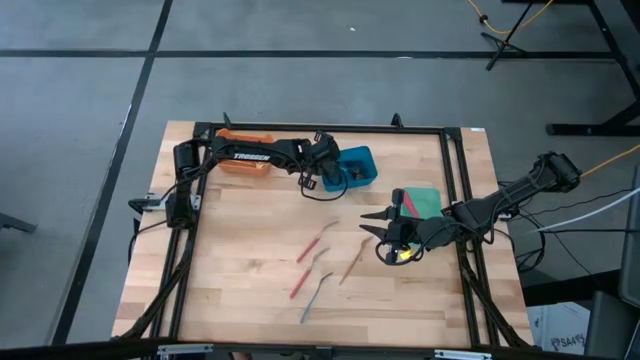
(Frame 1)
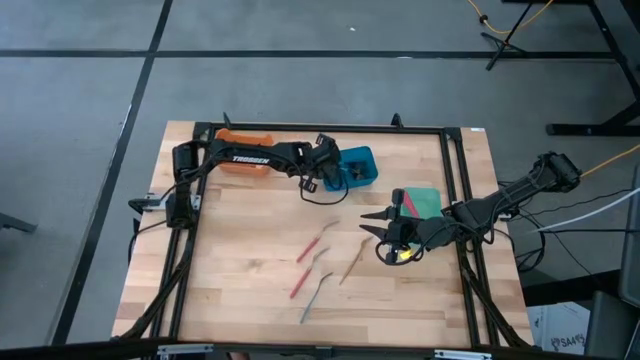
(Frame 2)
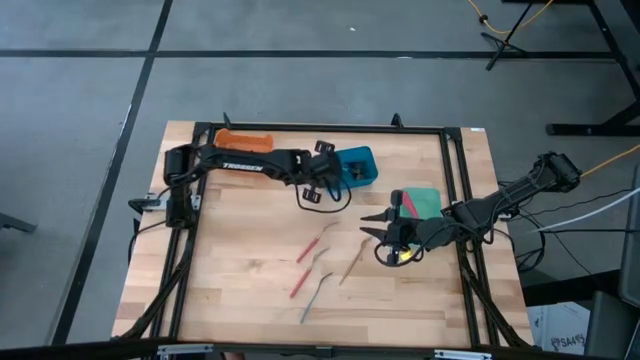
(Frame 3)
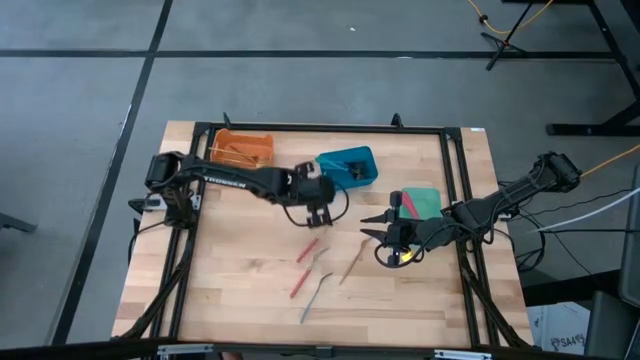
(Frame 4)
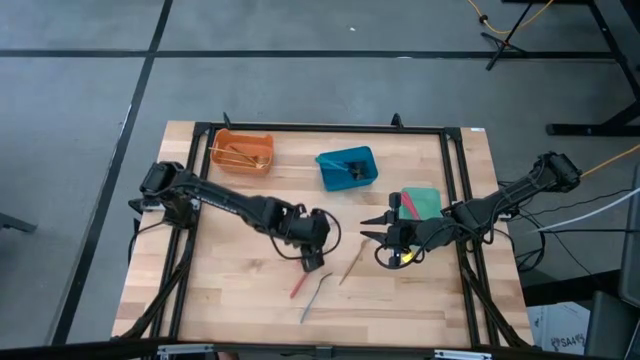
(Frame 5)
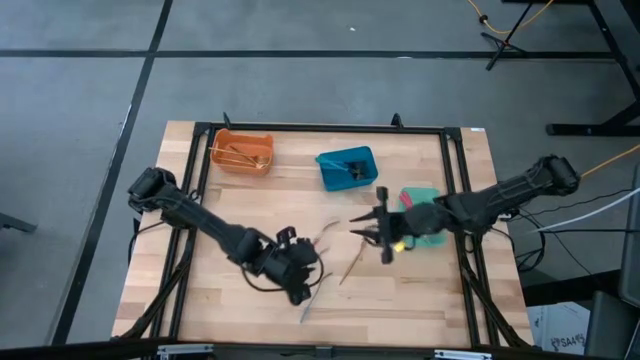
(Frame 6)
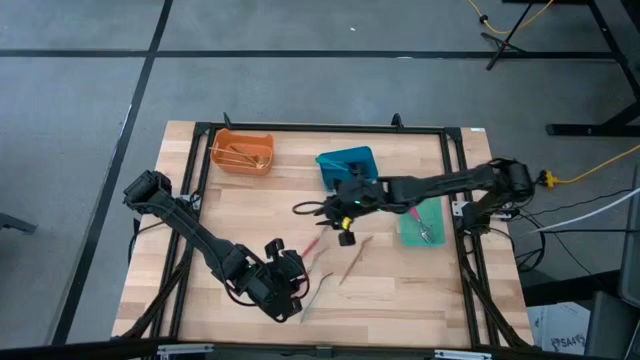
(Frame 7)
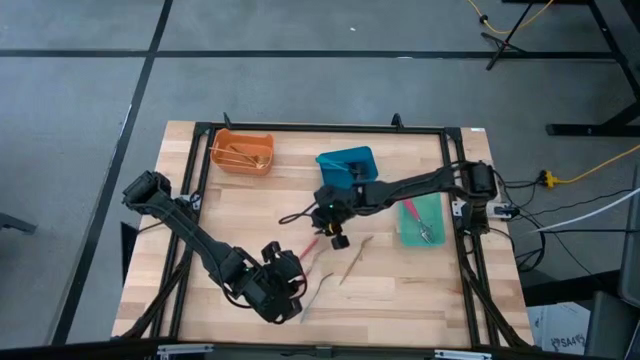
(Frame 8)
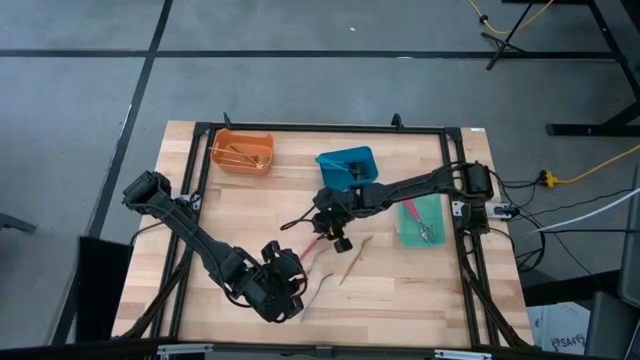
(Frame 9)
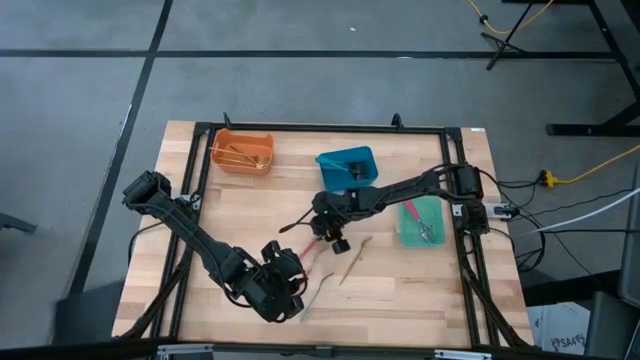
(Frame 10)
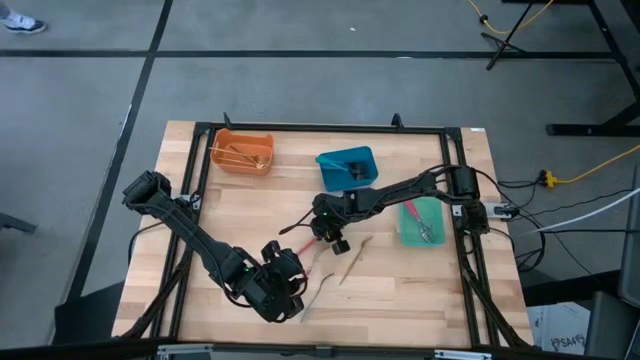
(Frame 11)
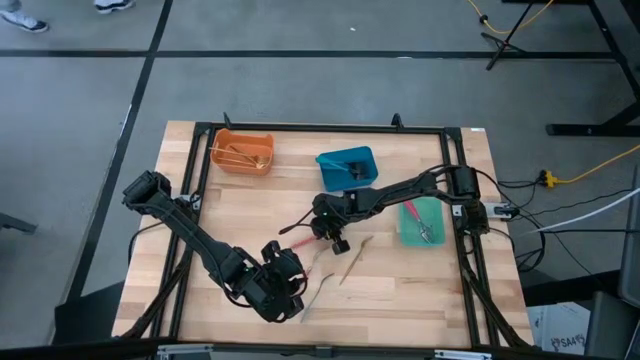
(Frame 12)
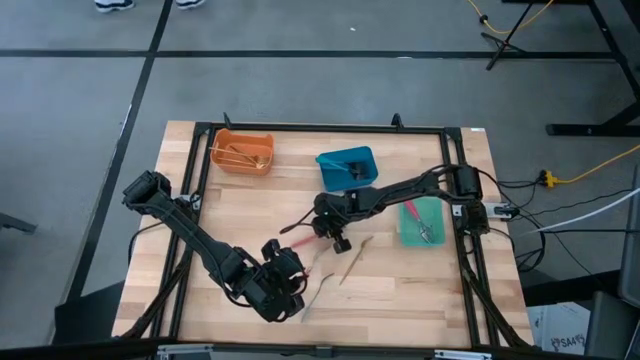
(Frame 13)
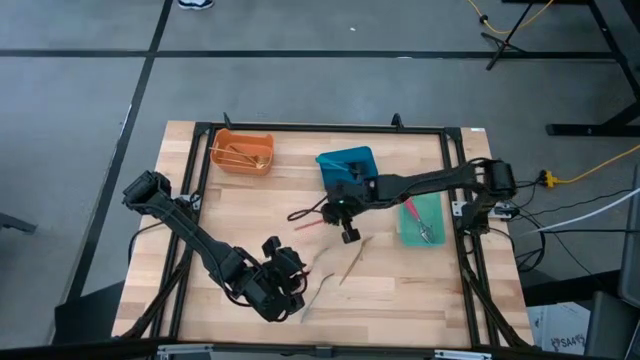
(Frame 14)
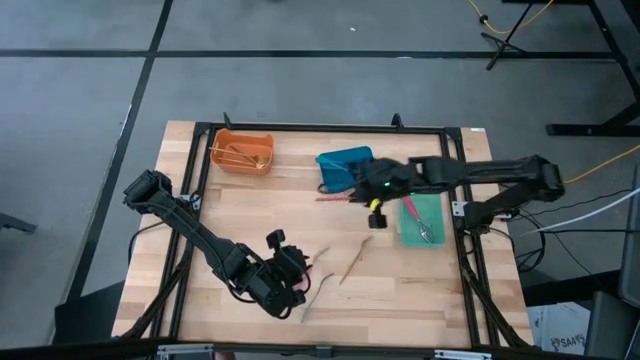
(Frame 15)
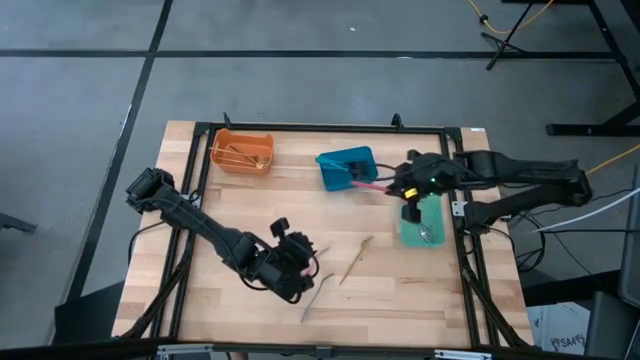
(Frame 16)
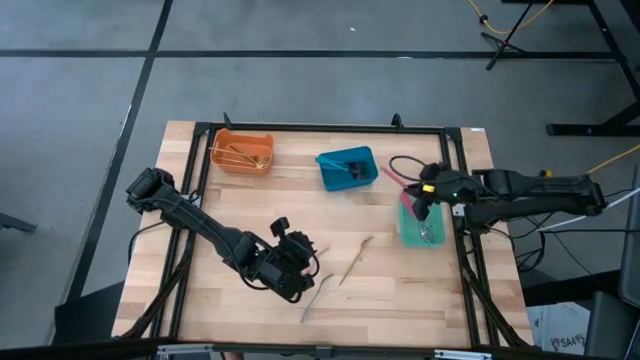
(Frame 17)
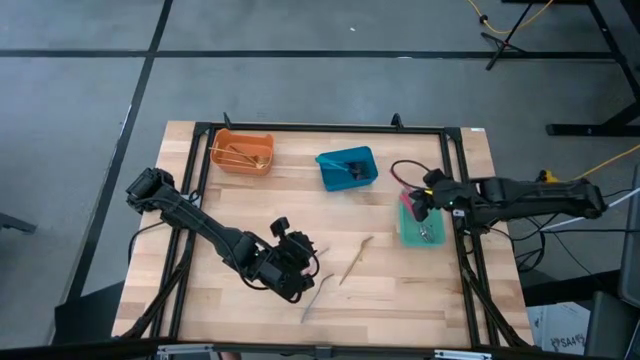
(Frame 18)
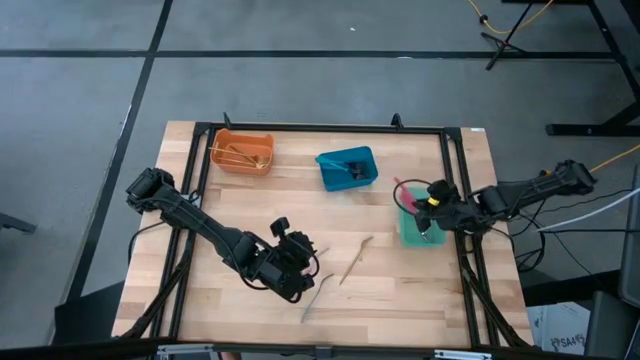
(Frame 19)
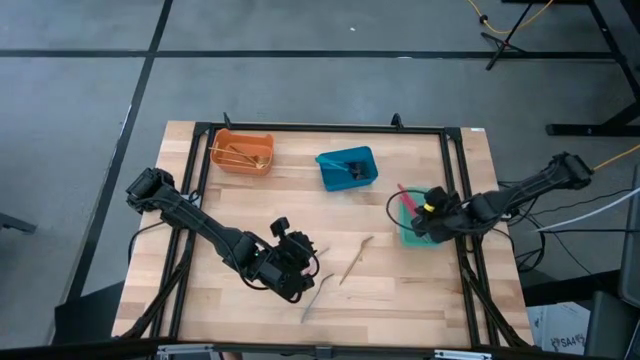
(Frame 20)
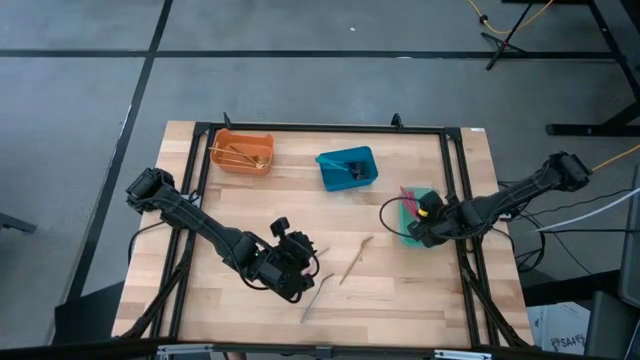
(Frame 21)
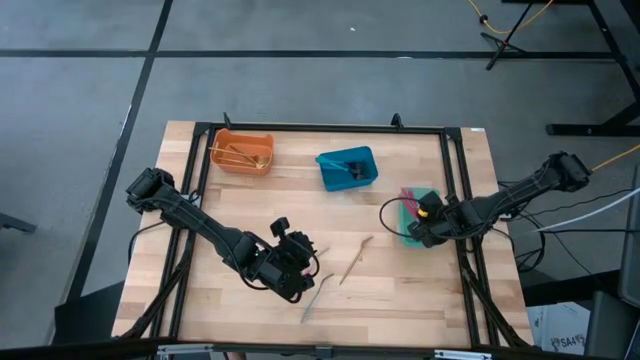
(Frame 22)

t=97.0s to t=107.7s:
Task: Sort silverware by color (type)
Put the pink fork into the green bin

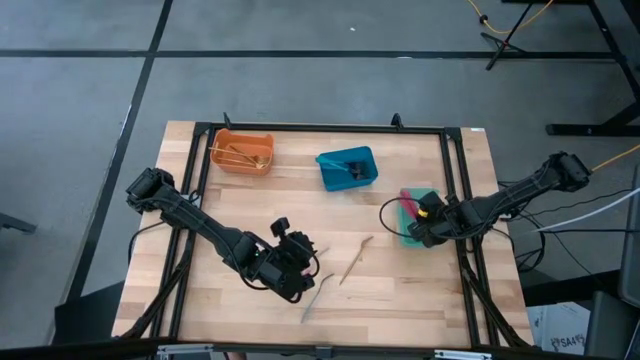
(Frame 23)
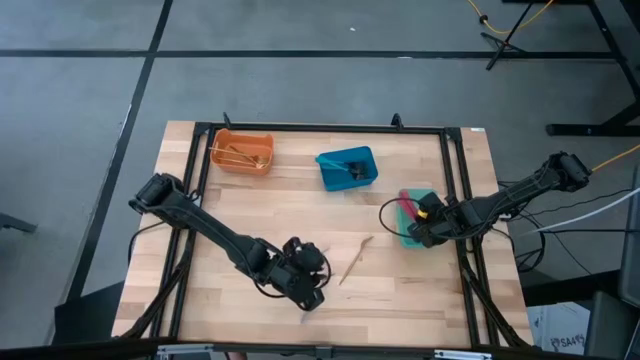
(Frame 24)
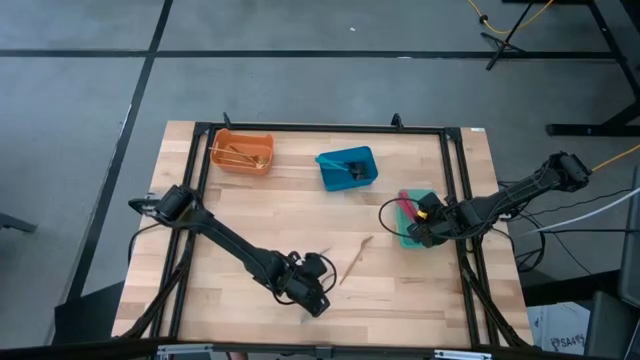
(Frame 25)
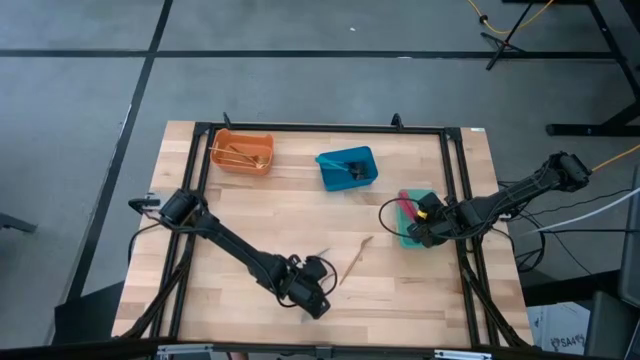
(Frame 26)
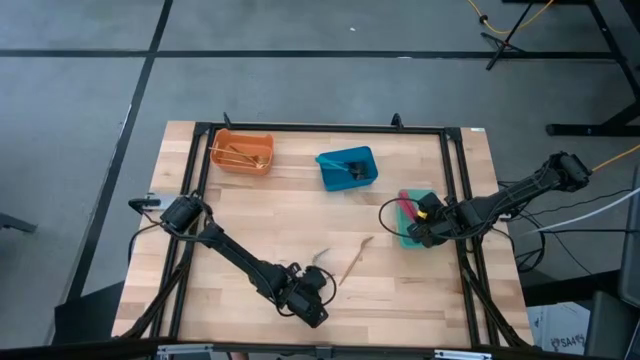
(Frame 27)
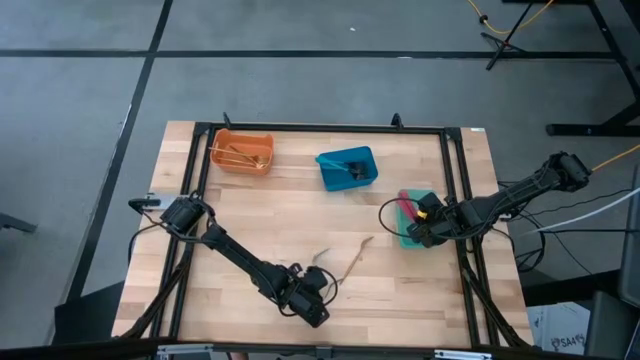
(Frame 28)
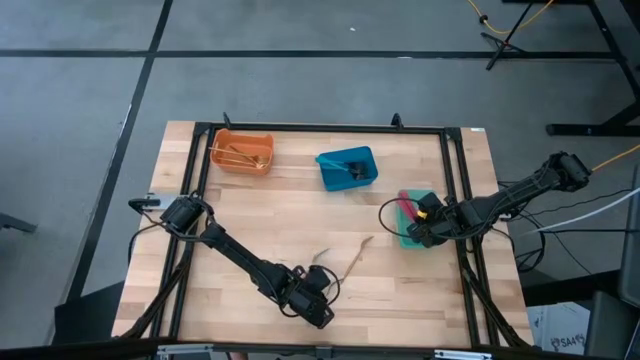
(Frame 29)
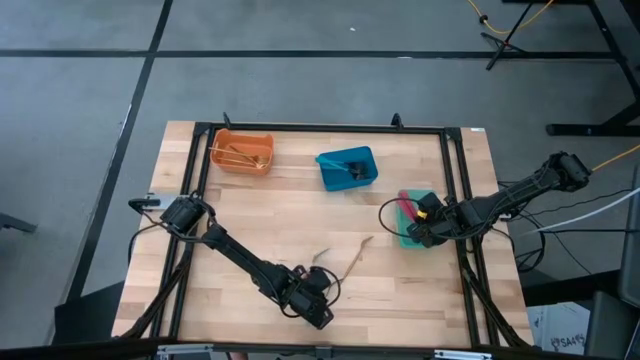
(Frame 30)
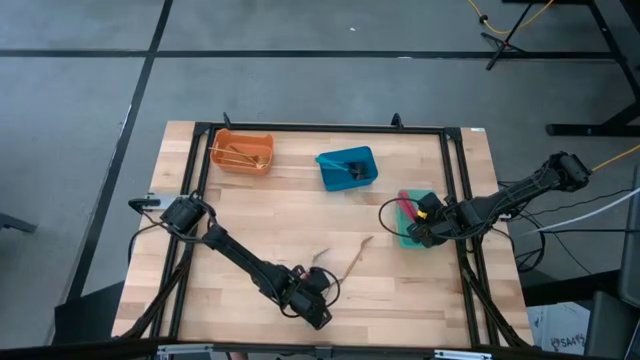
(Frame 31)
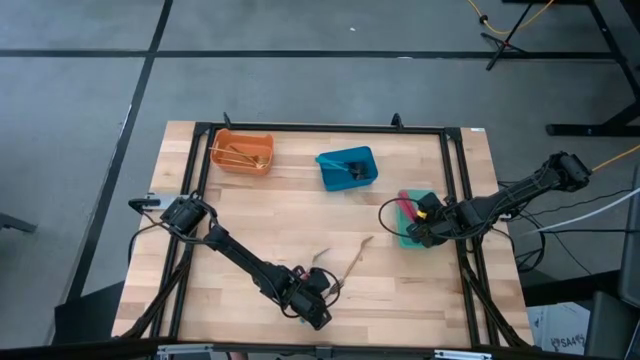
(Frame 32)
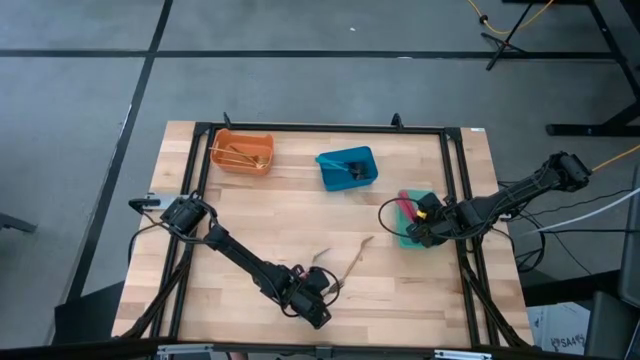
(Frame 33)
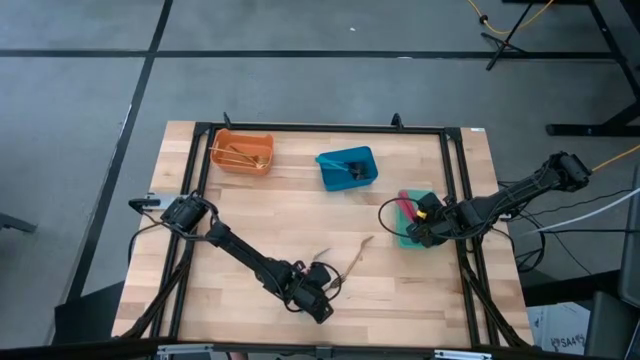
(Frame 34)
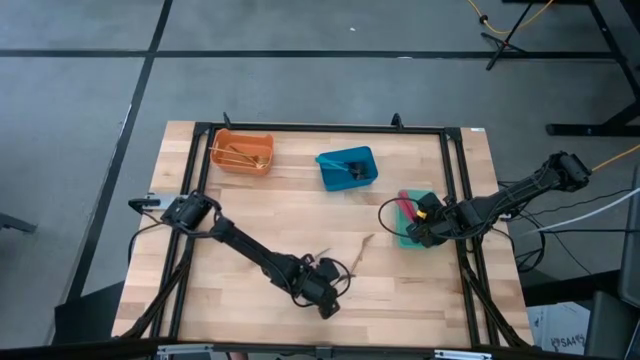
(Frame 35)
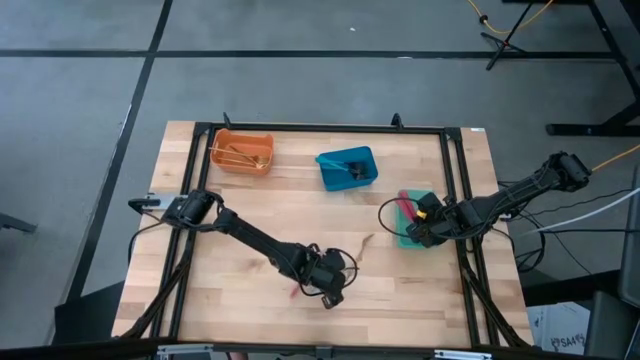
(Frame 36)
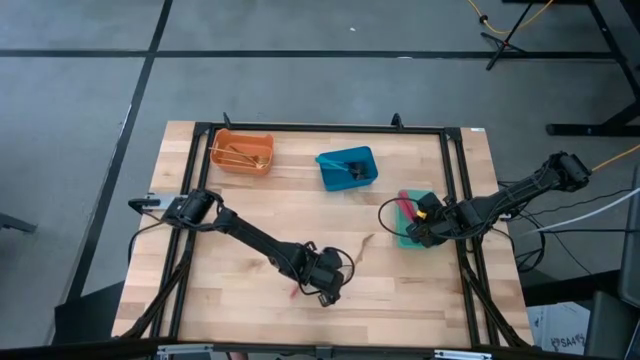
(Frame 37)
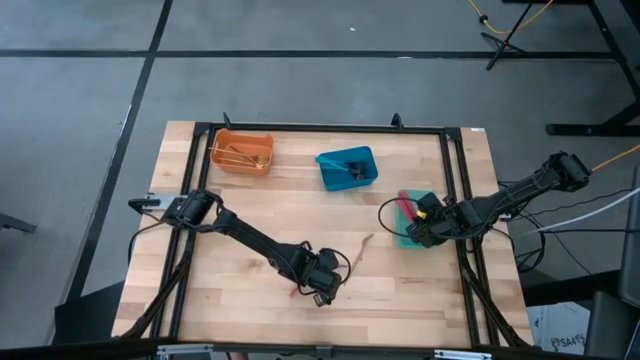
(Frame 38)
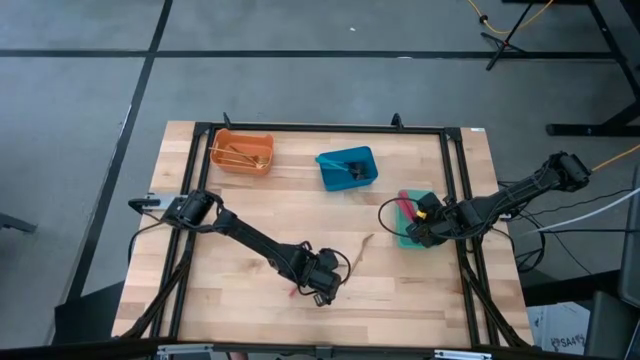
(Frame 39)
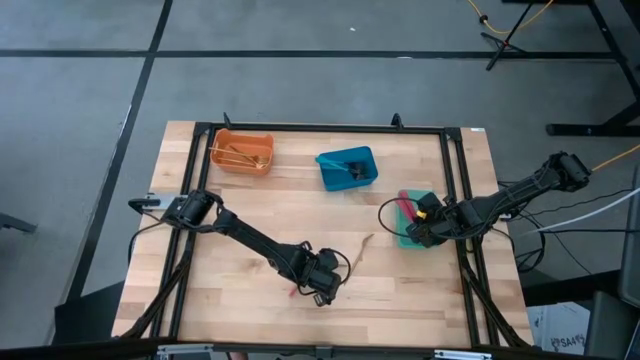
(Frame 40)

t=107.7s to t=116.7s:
Put the blue fork into the blue bin

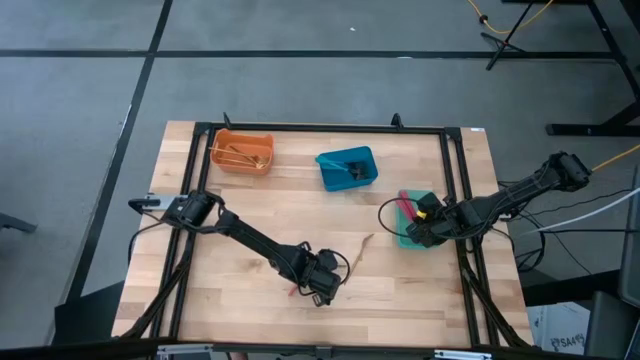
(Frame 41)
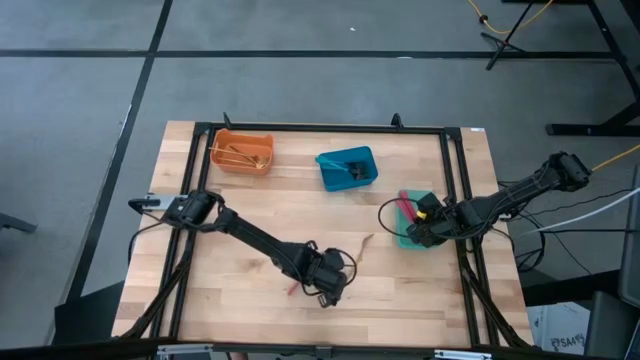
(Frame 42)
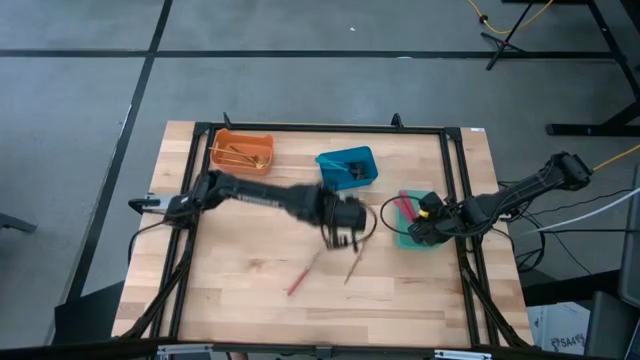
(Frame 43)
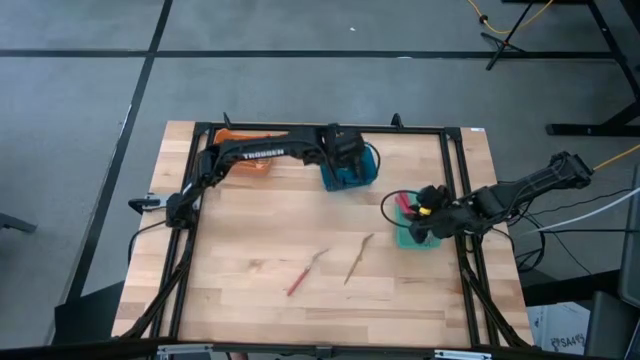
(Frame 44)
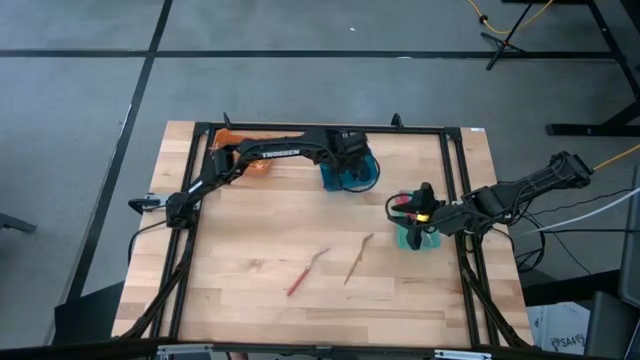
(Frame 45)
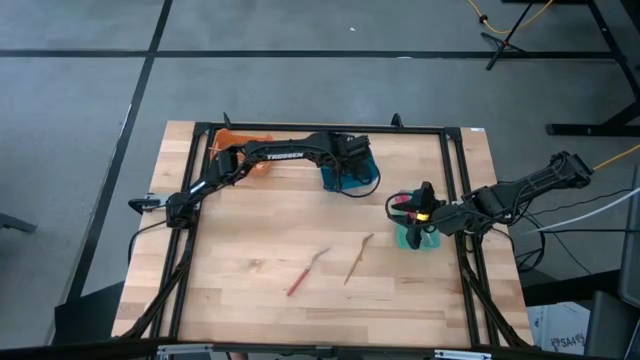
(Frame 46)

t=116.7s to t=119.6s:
Put the blue fork into the blue bin
